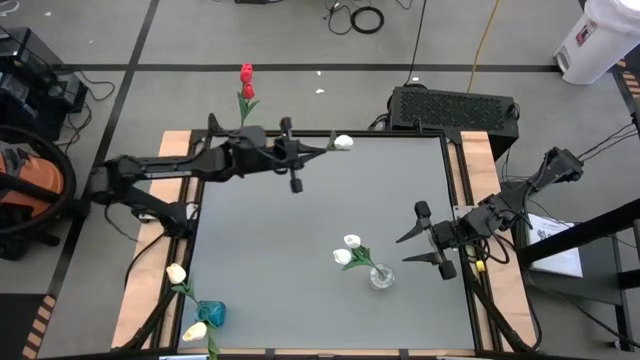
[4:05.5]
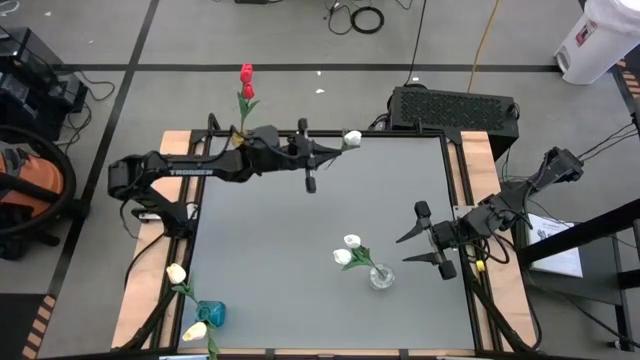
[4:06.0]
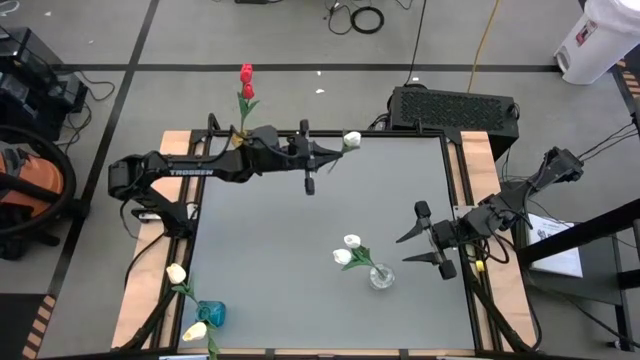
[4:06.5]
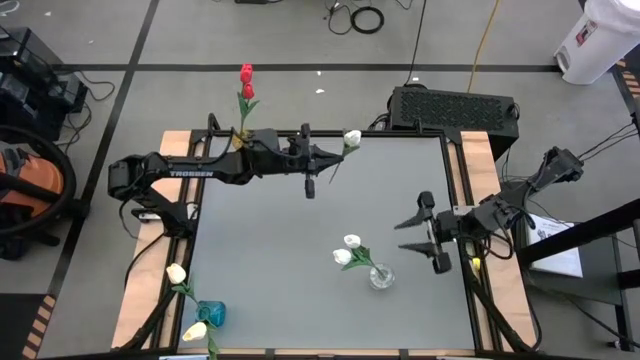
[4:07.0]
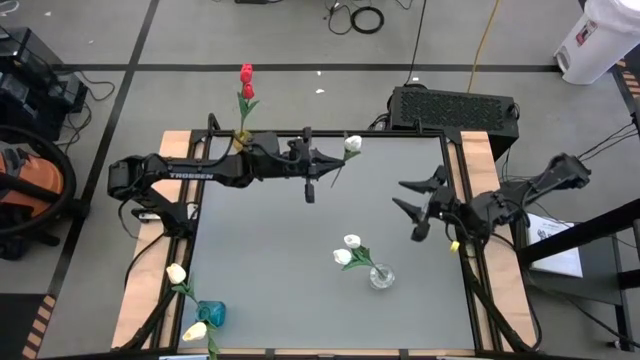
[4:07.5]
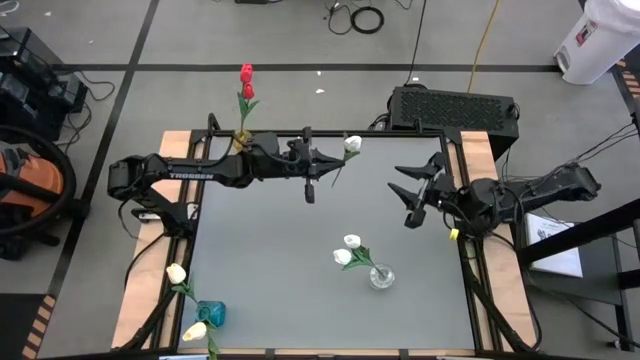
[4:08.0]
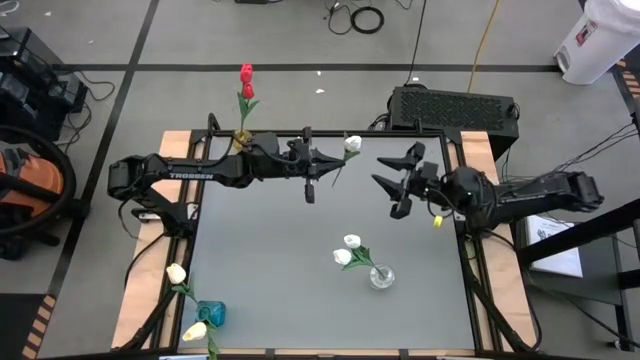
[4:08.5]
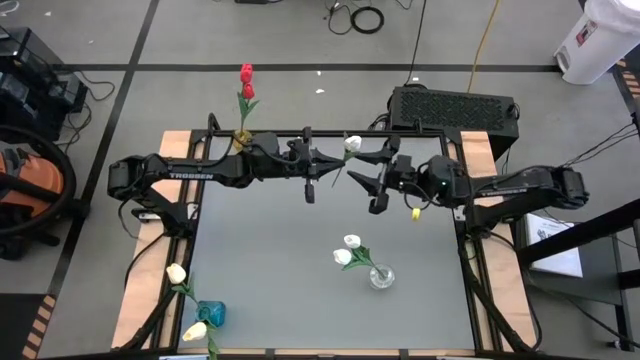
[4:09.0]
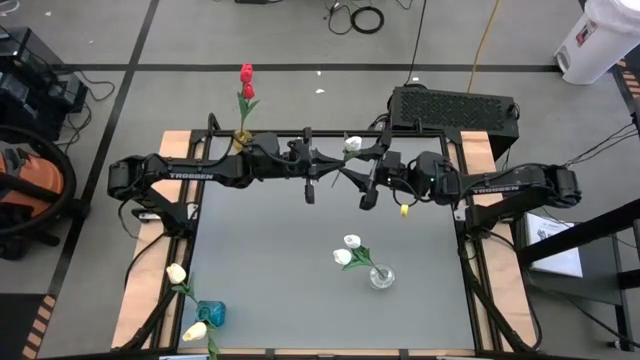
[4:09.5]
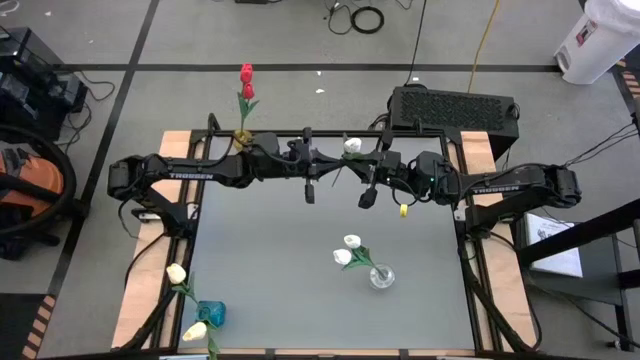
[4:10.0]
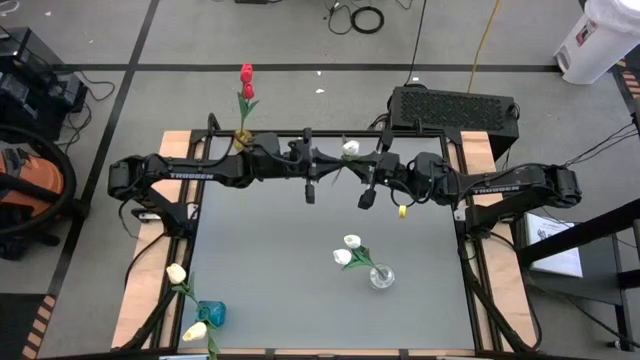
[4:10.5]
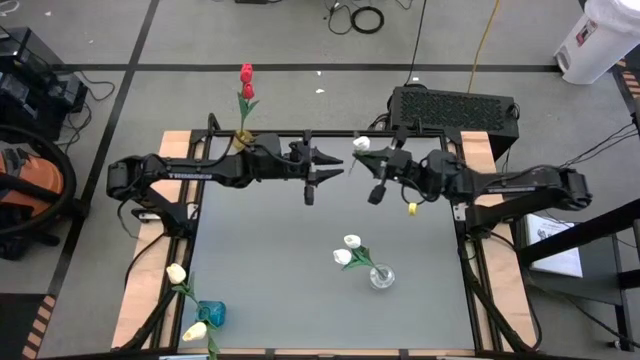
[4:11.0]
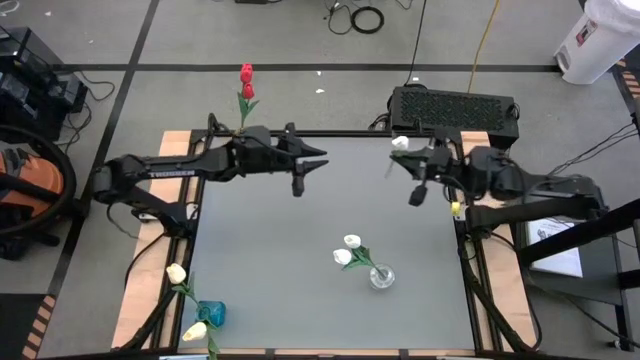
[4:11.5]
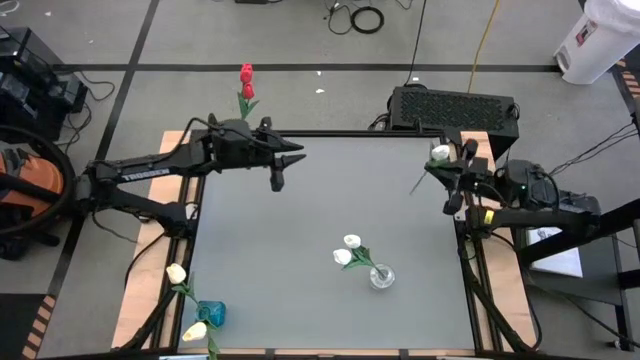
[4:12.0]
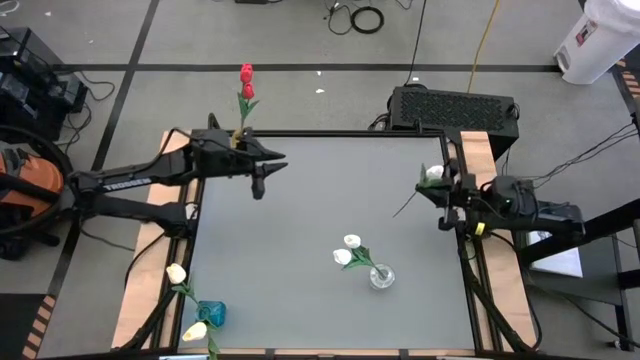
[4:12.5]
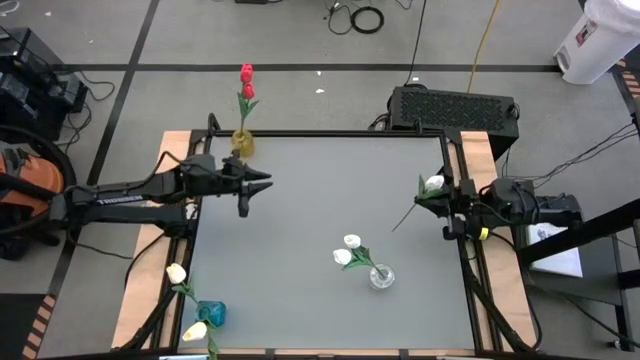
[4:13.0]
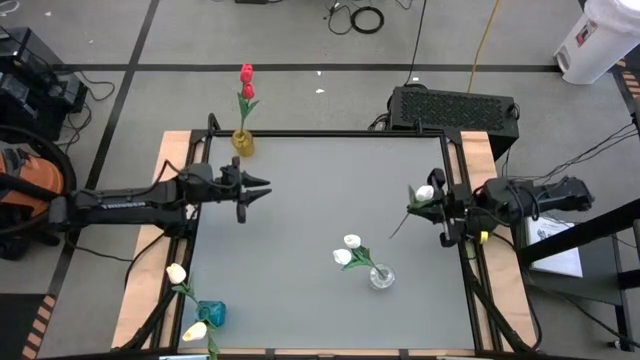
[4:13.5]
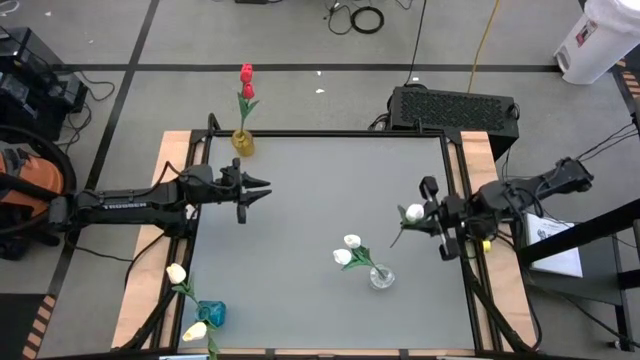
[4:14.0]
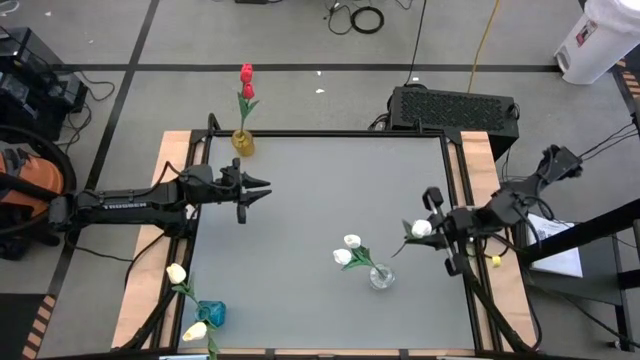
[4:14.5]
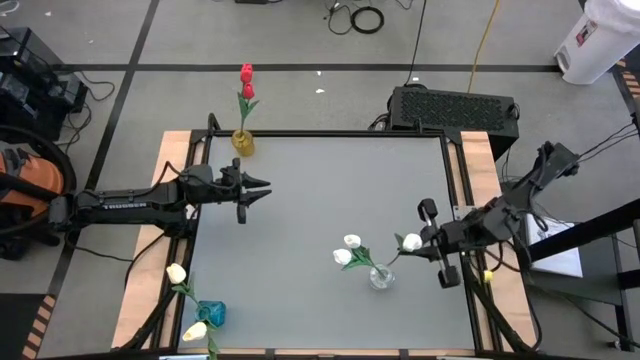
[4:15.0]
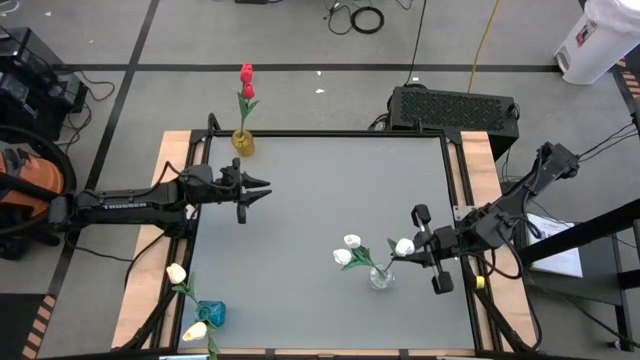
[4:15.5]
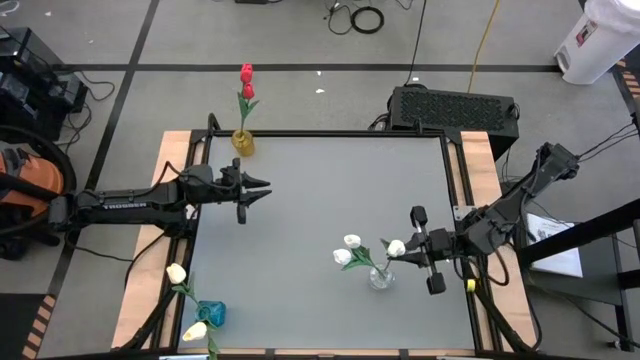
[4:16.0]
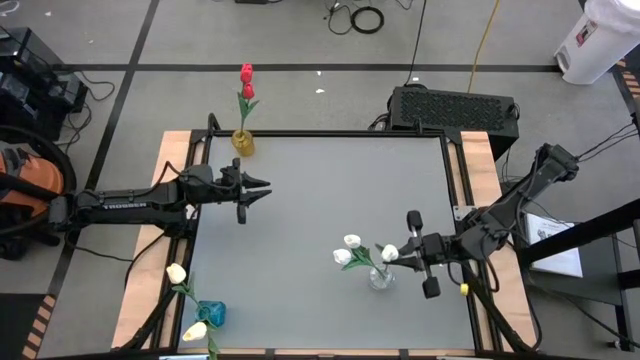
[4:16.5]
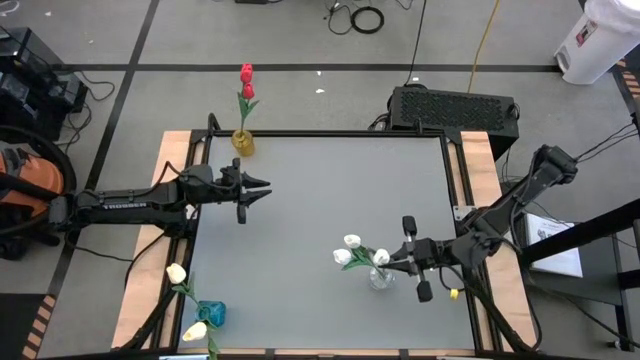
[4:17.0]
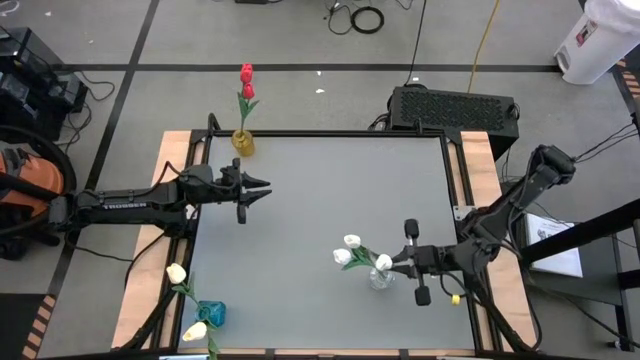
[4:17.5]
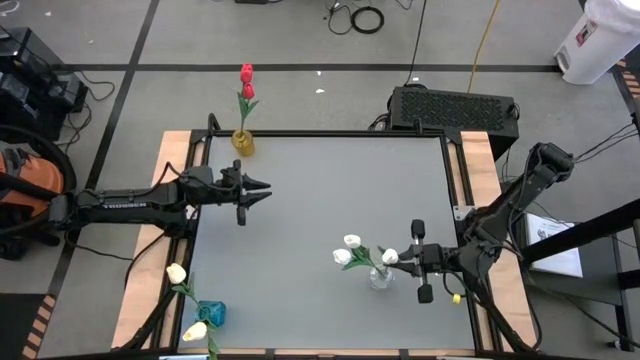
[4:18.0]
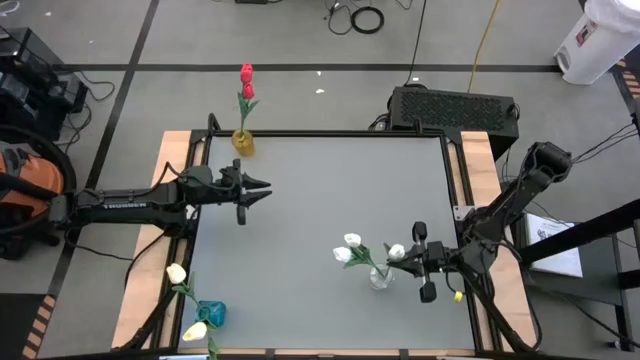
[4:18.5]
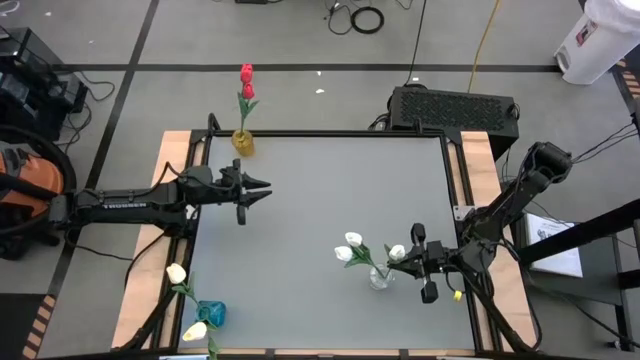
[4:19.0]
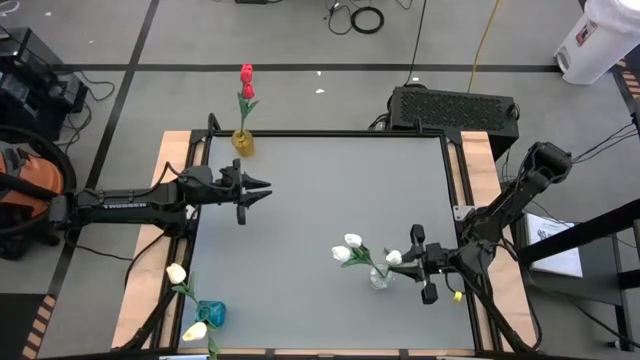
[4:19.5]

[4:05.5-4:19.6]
Task: Sort flowers into vase by color
Put the white tulip into the transparent vase

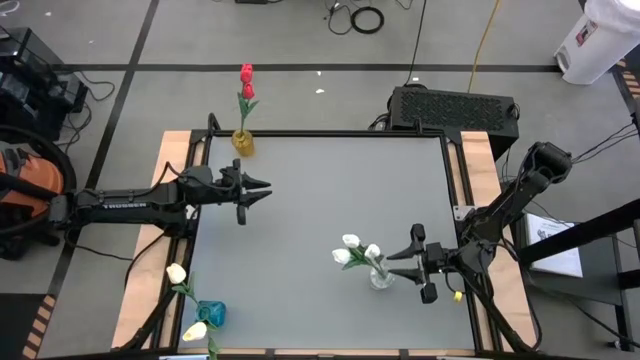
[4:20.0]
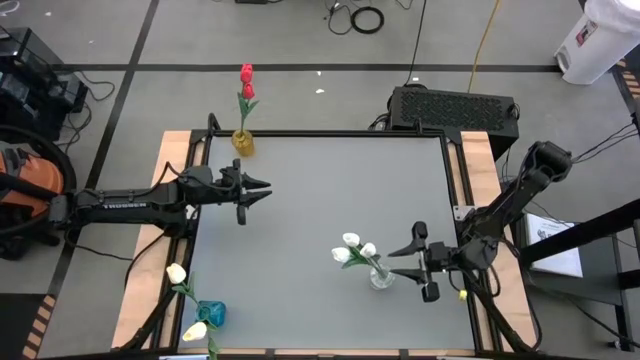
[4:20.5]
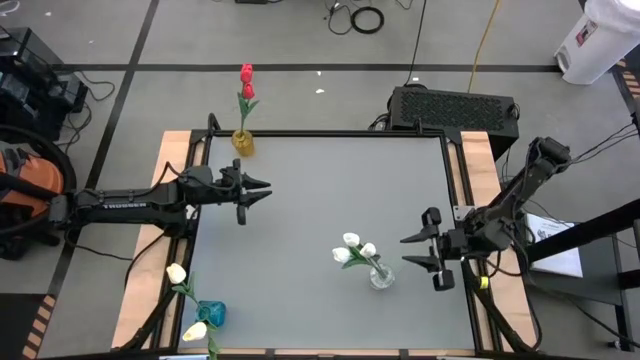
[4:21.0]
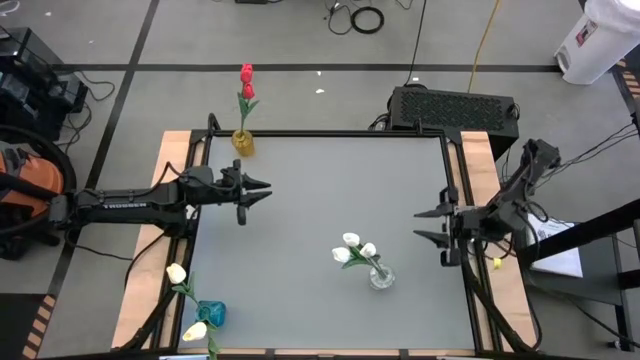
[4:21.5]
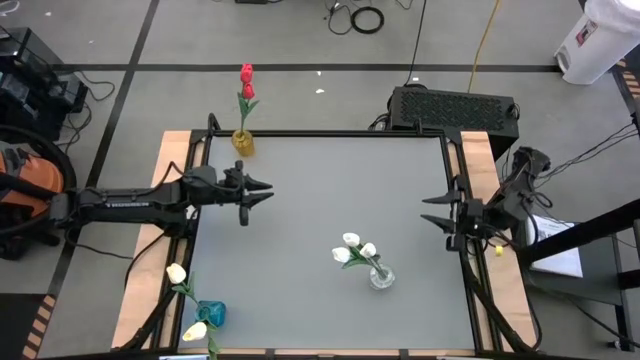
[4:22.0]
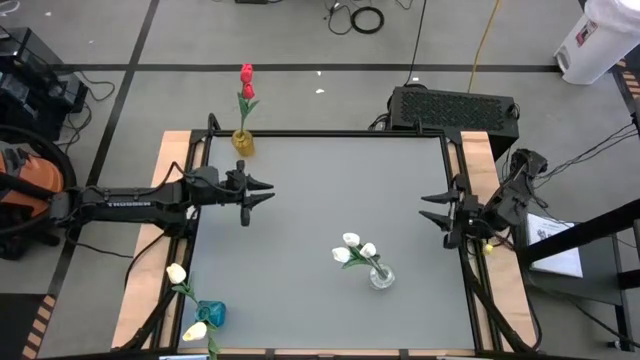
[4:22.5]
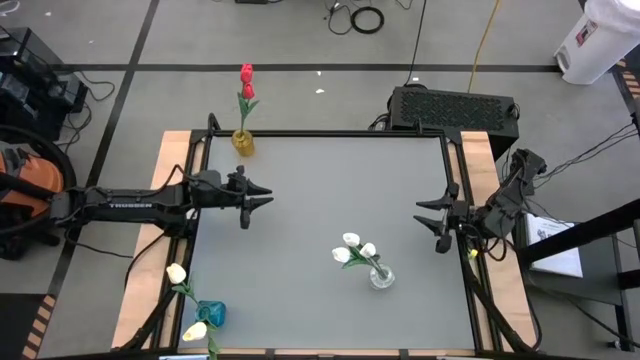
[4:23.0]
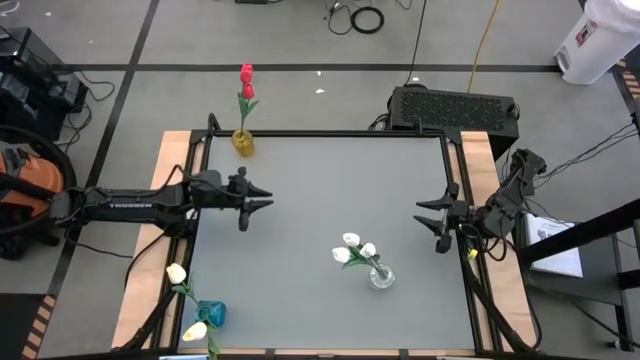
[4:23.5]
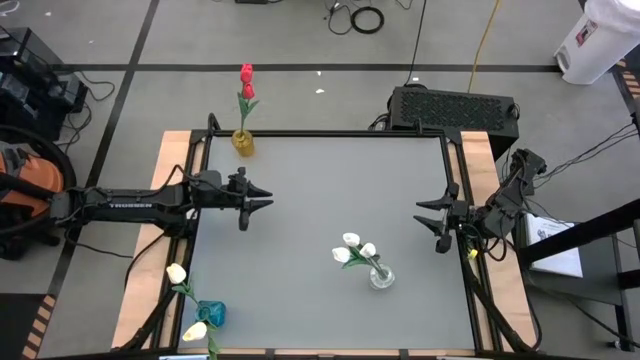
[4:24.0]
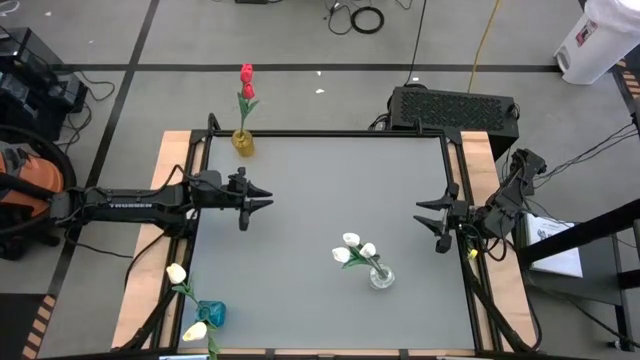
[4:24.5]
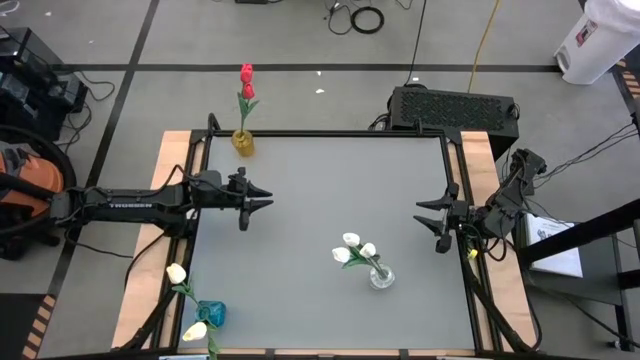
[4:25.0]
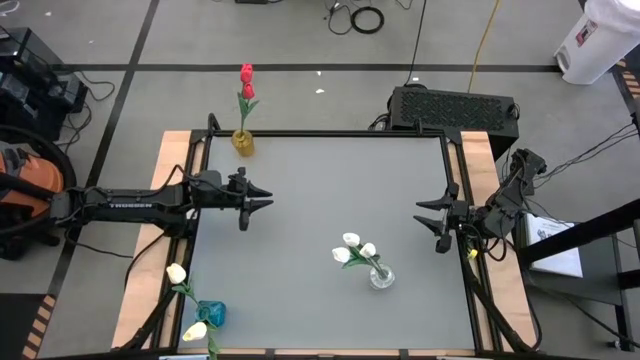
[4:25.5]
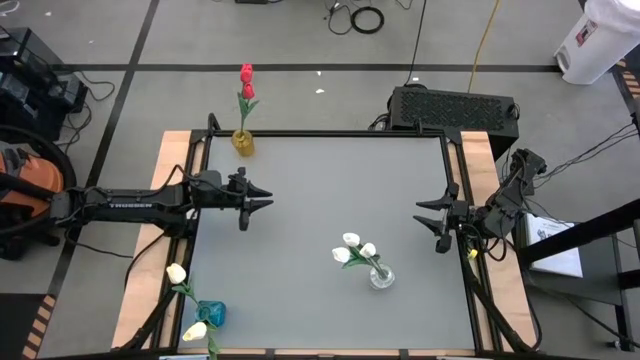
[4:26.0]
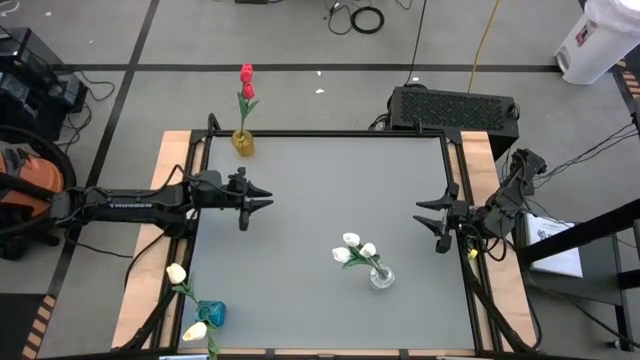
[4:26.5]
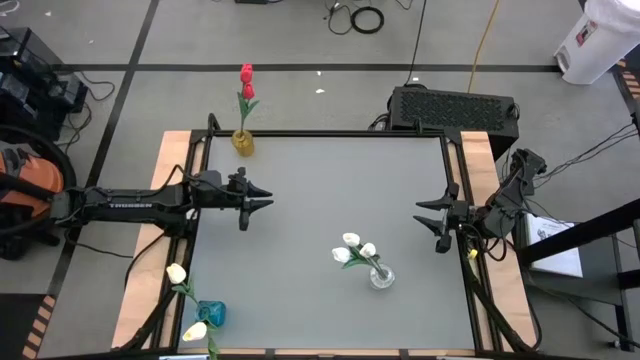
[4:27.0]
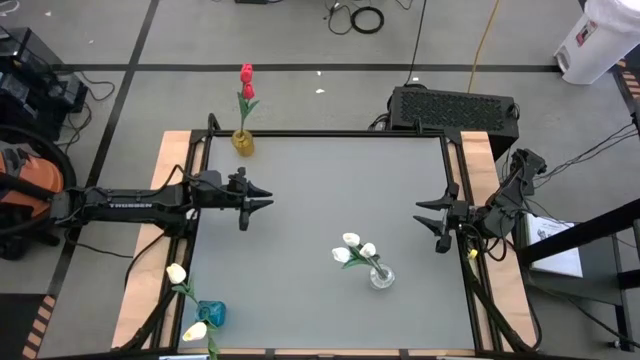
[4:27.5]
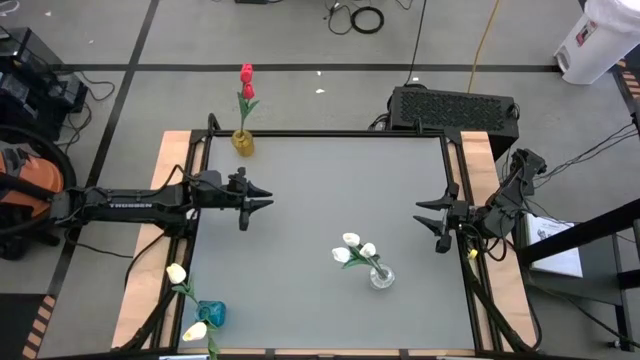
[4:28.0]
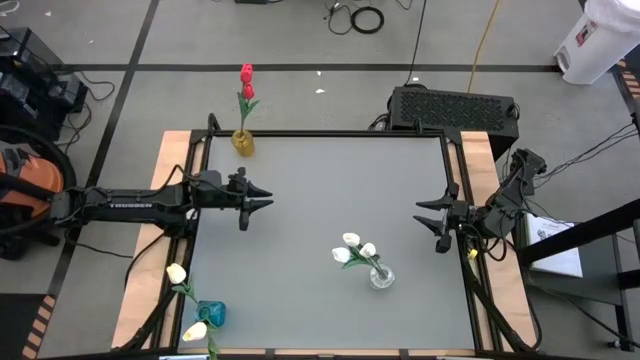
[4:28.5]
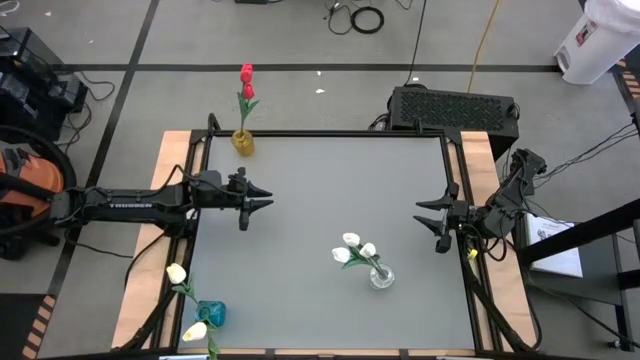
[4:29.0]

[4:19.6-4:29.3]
Return to Home Position
